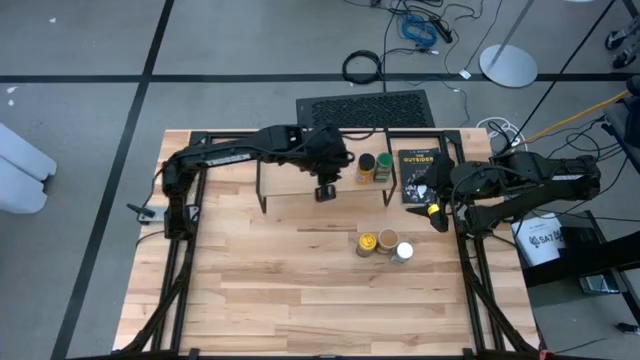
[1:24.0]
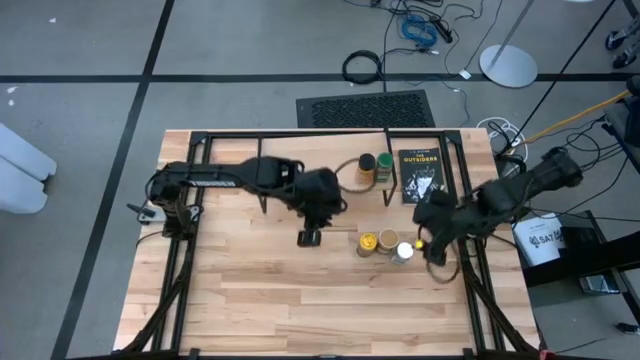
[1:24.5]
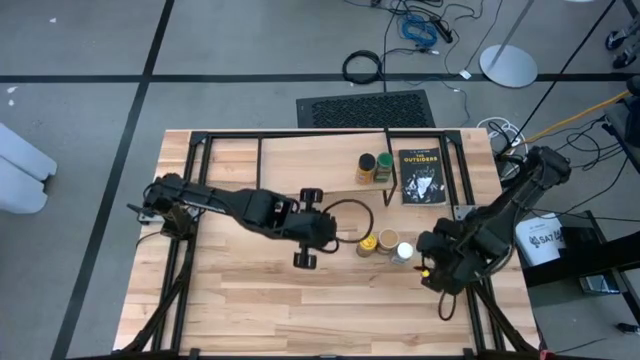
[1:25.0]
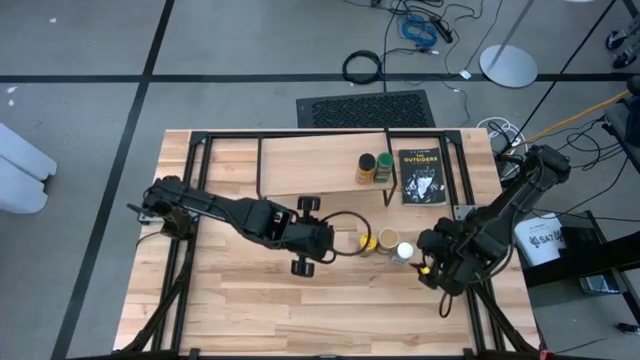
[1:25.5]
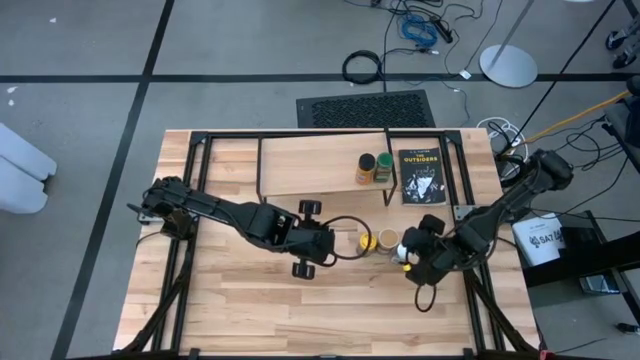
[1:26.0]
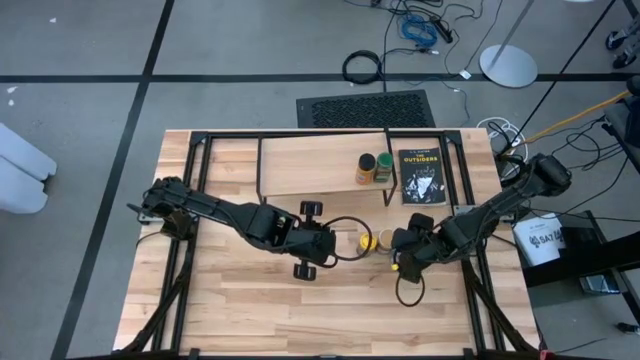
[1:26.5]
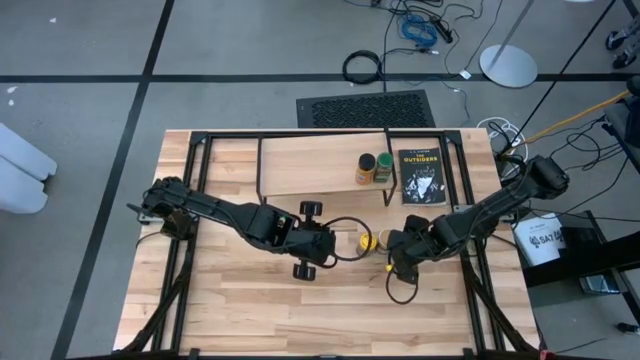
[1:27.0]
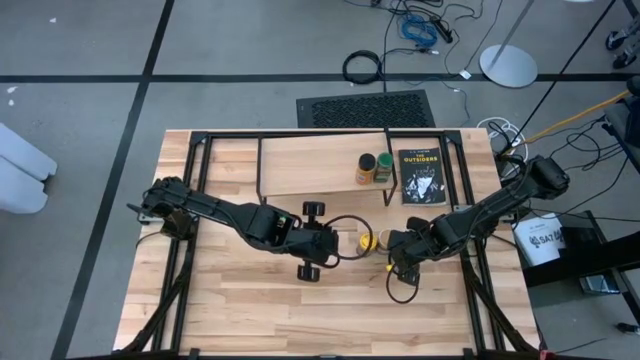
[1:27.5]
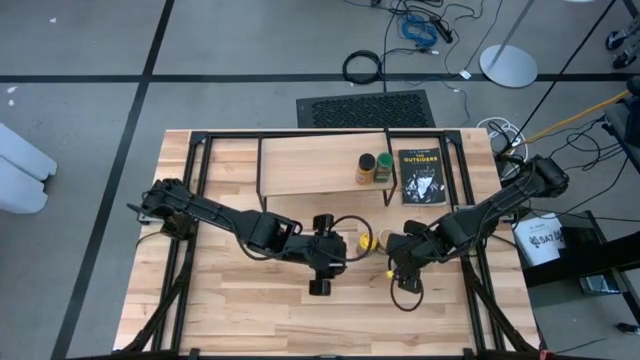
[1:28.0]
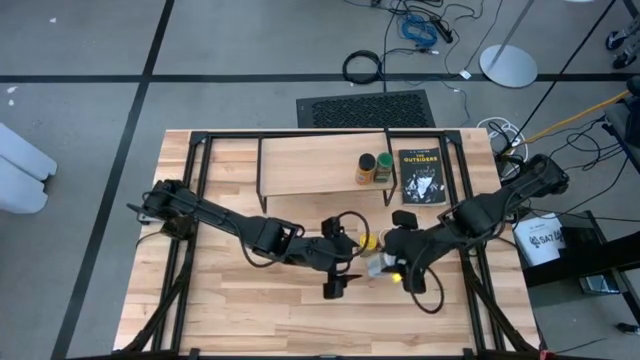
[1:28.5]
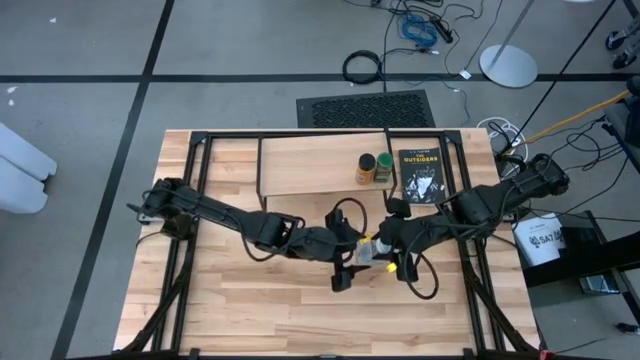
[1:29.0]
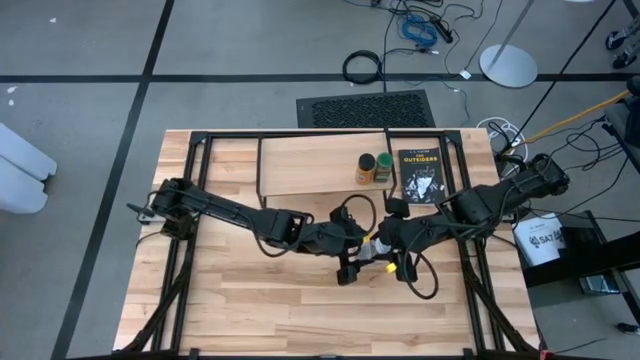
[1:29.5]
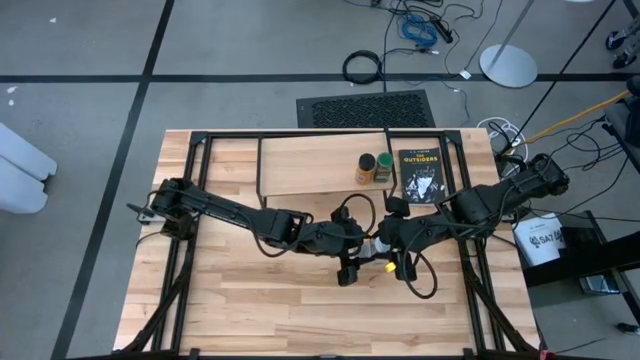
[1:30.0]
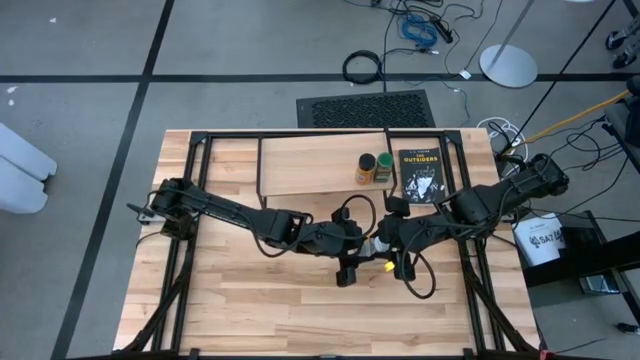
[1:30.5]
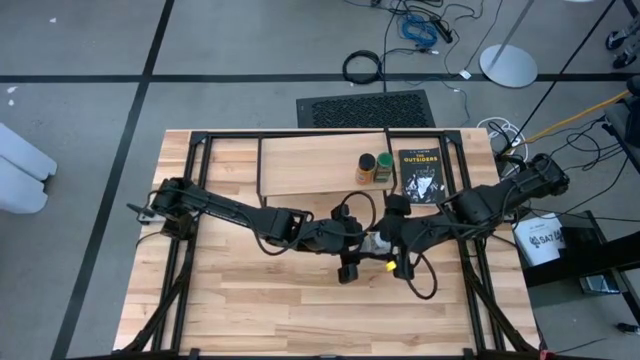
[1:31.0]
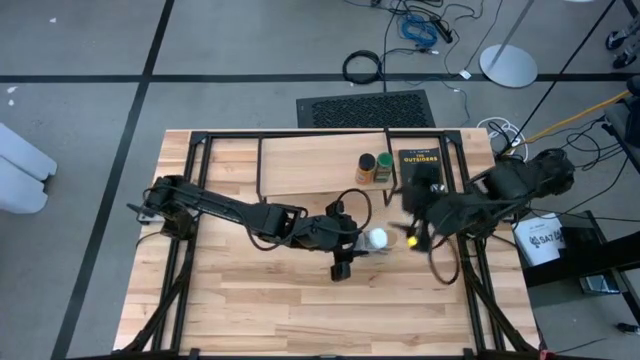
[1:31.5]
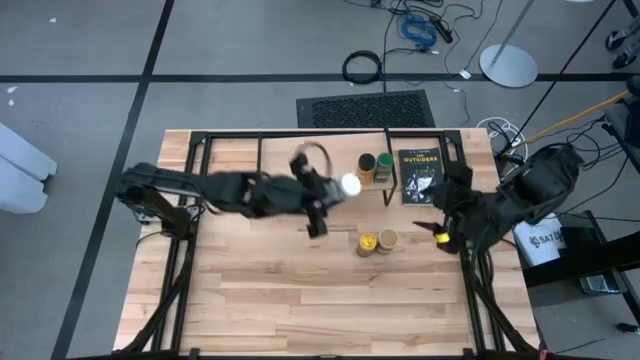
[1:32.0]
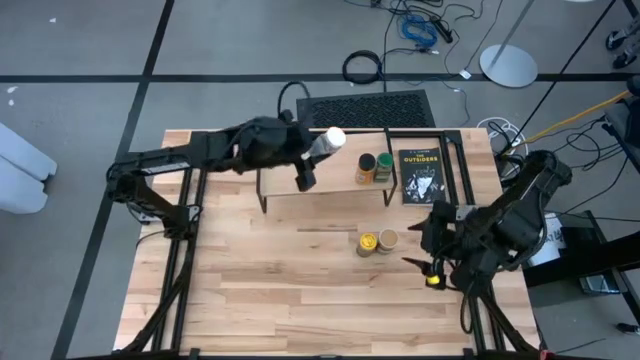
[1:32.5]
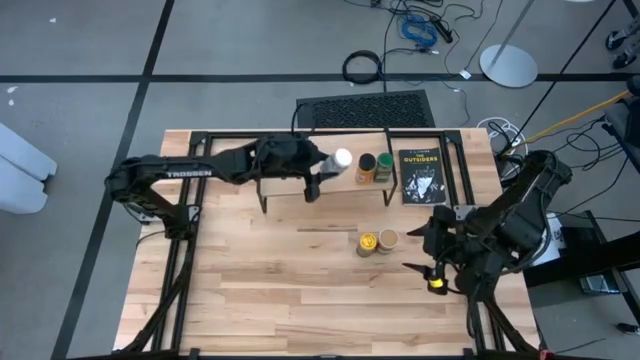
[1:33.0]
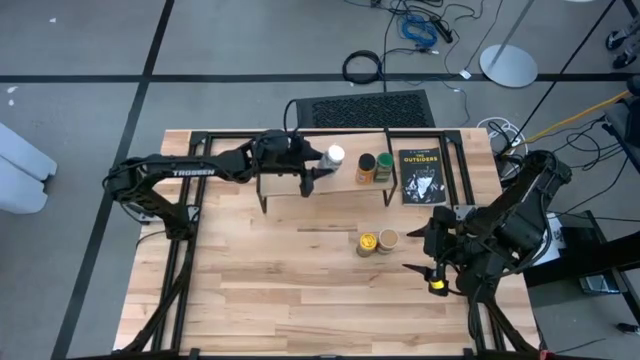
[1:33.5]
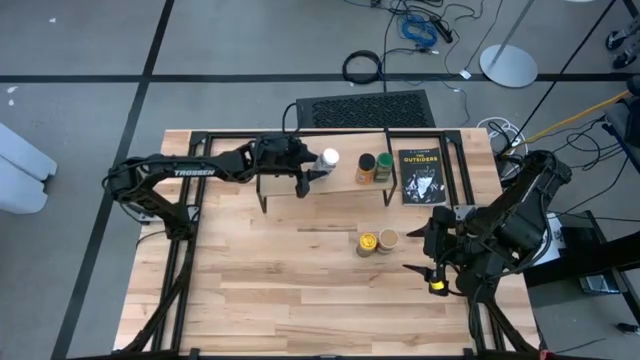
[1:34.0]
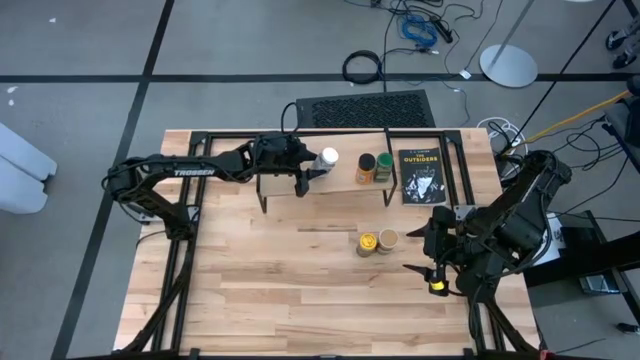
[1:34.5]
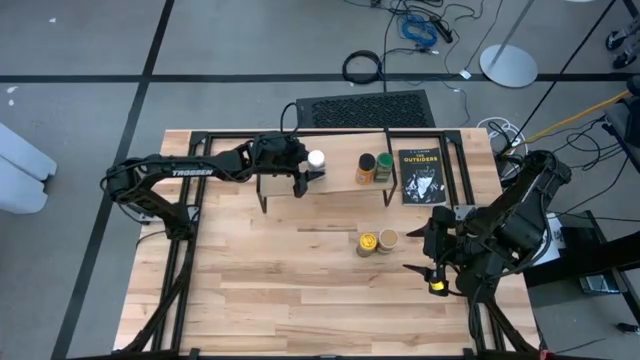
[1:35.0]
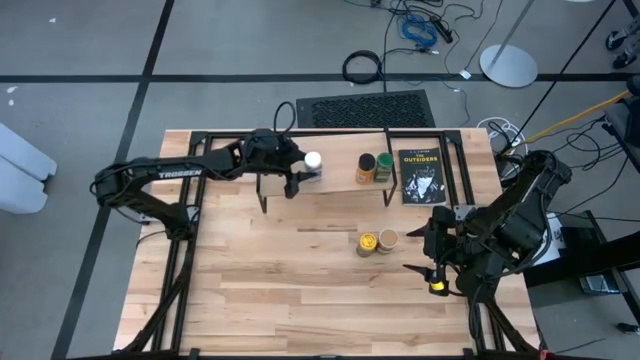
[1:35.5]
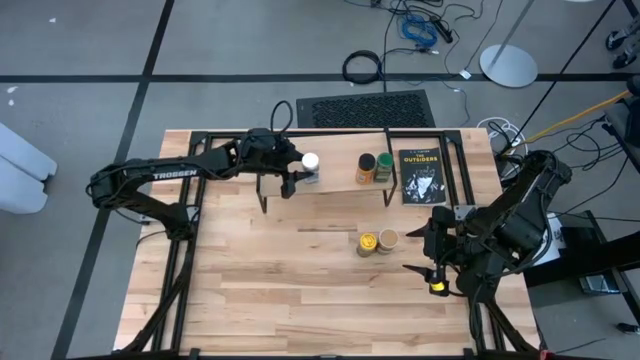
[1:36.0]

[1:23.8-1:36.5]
Task: Shelf spices
Put the white seasoning bottle on the shelf

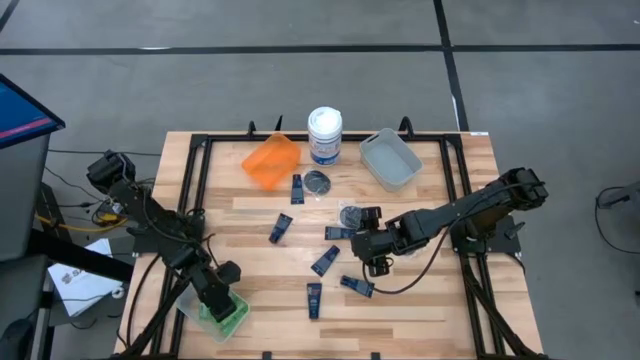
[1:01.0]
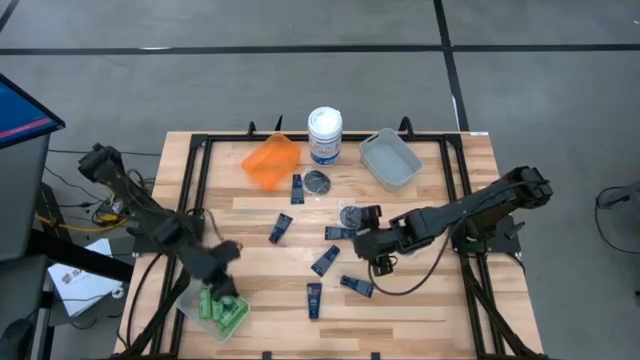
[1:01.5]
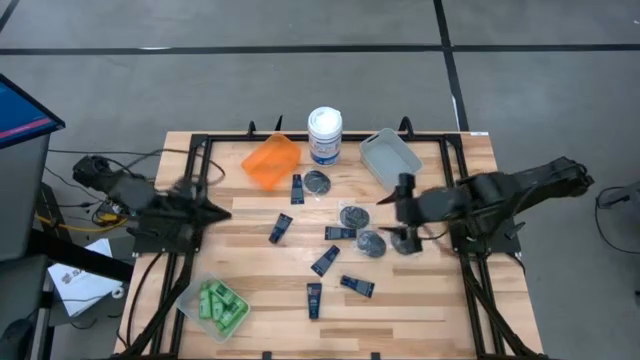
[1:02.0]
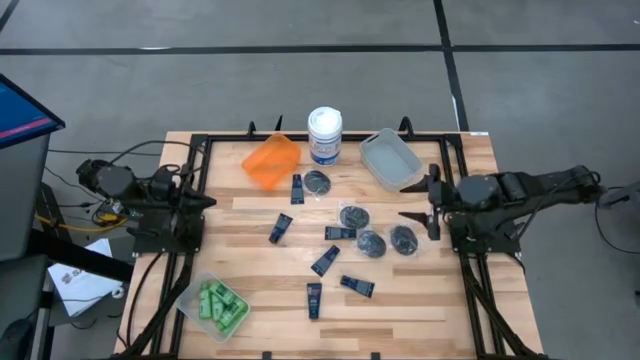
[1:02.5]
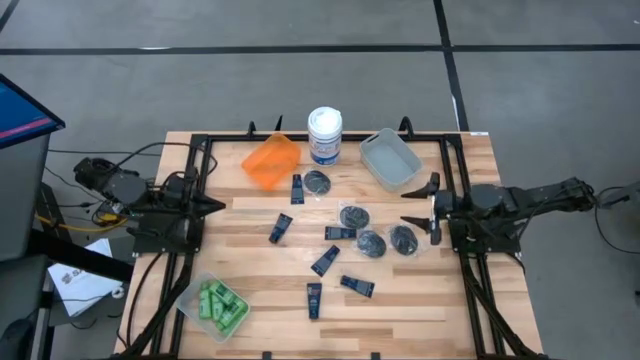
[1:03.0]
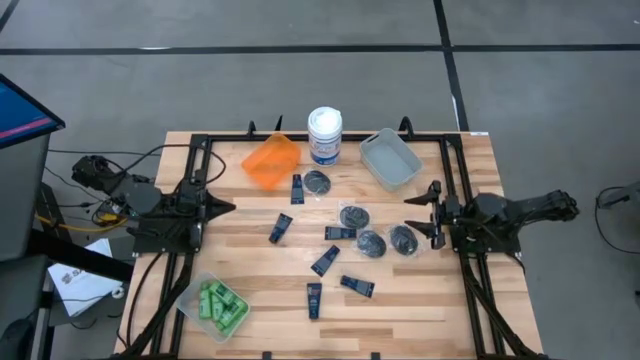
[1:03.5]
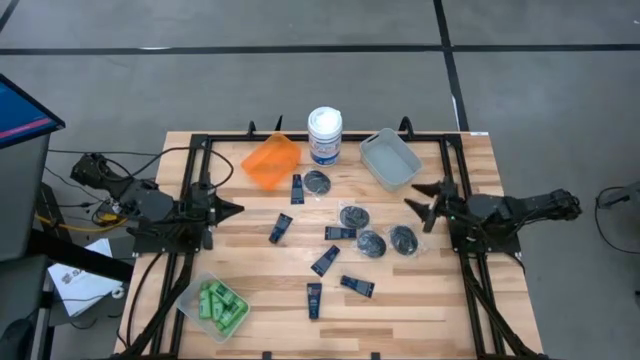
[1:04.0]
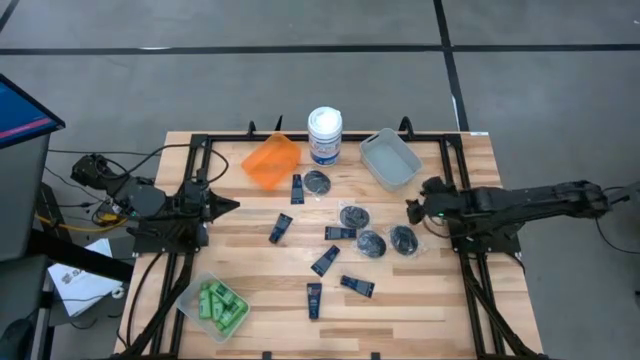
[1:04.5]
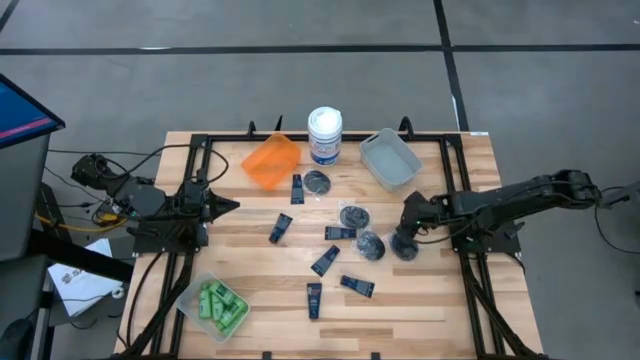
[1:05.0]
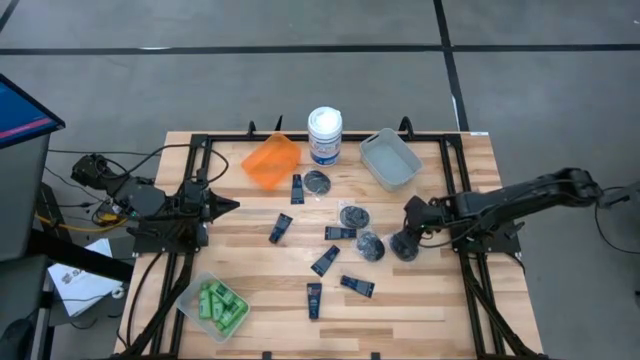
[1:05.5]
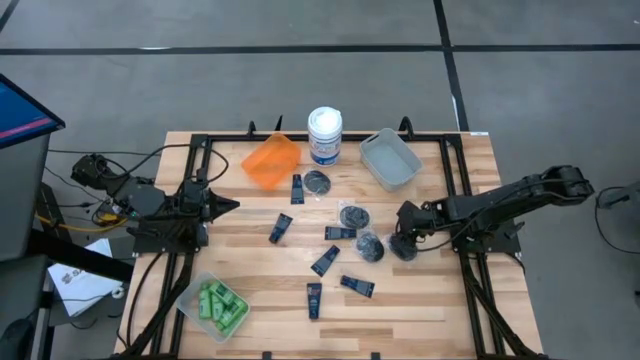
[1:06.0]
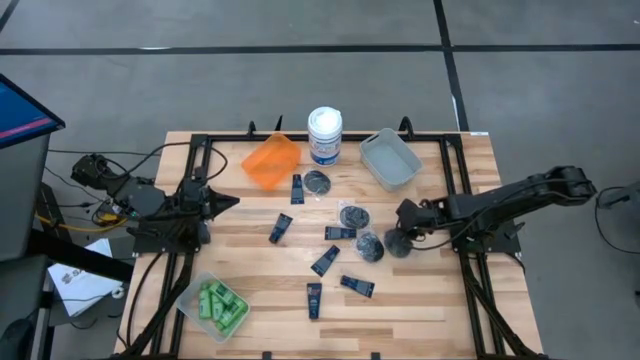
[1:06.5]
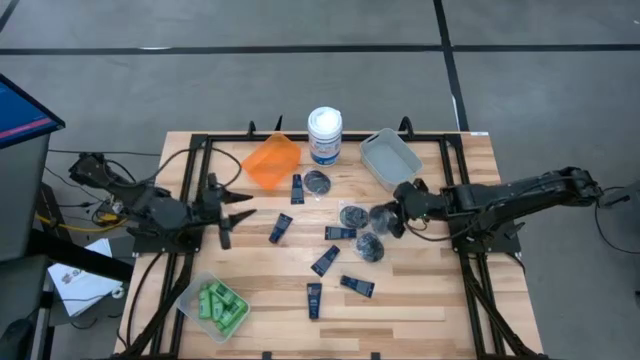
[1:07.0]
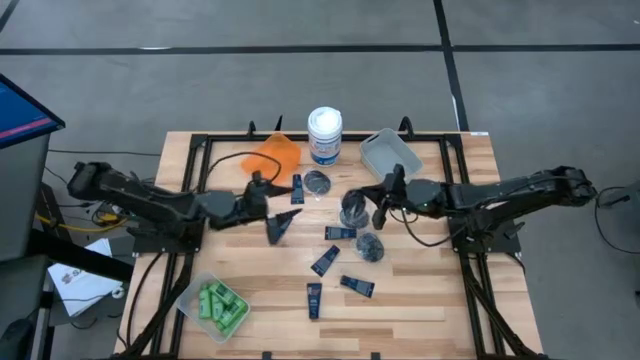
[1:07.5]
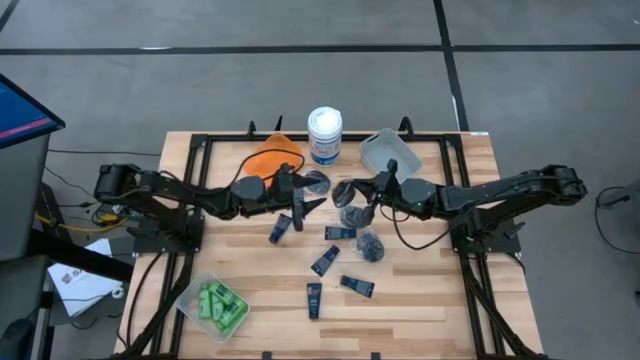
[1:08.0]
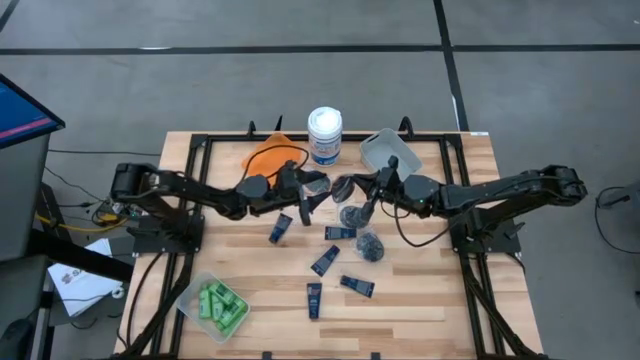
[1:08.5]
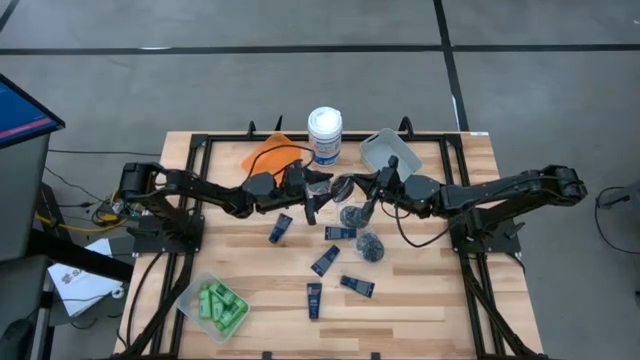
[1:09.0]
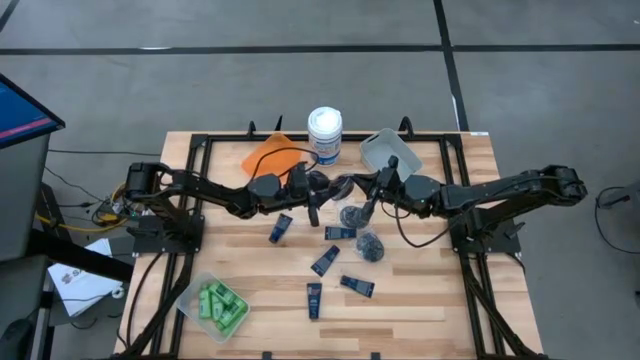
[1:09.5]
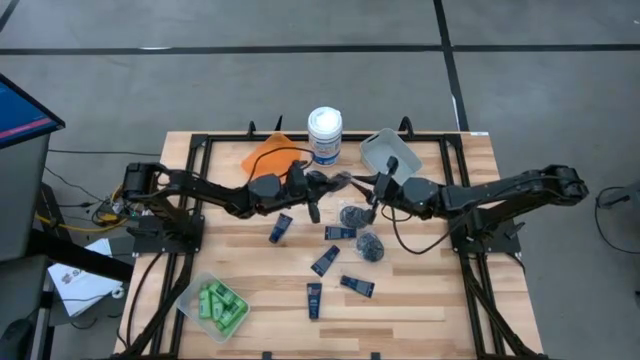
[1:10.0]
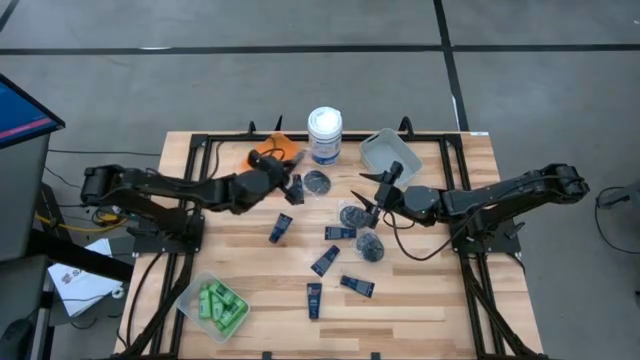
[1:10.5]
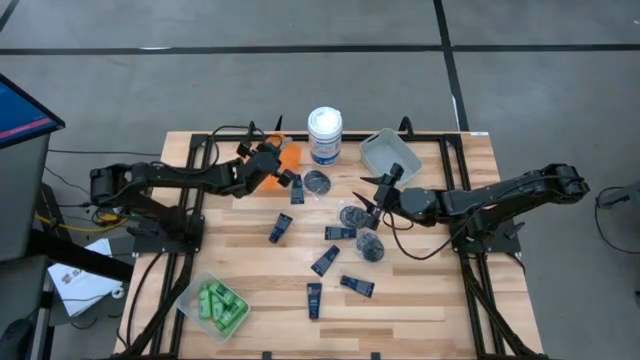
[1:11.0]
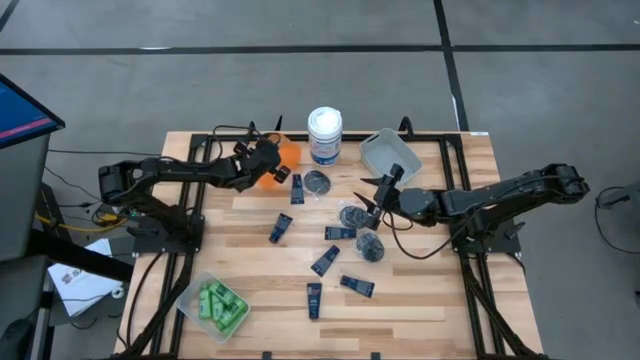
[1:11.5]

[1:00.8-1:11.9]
Task: Pick & Place Travel size toiletries
Put the hair brush into the orange bin
